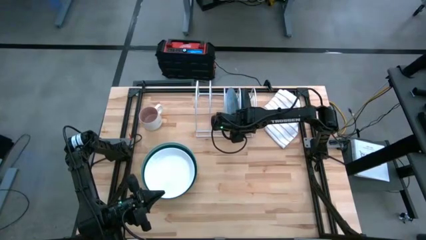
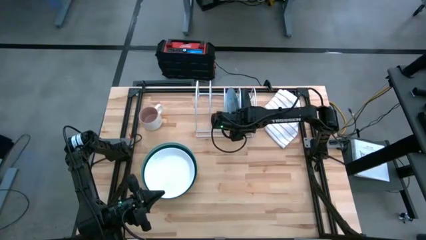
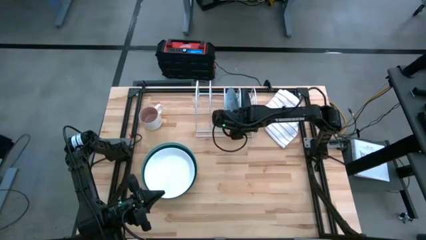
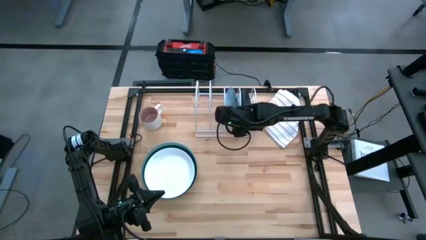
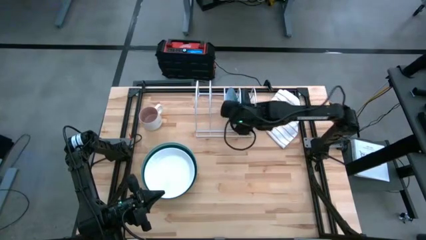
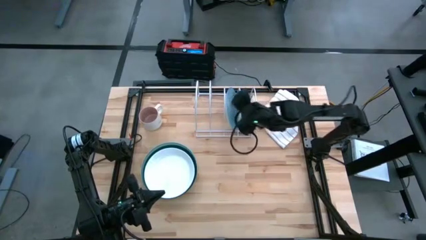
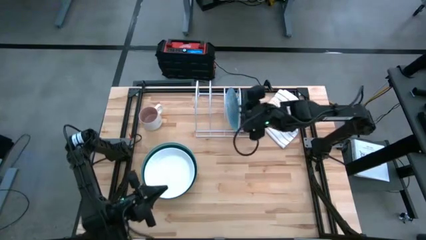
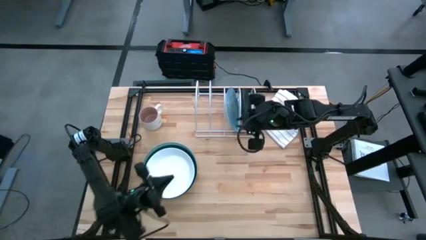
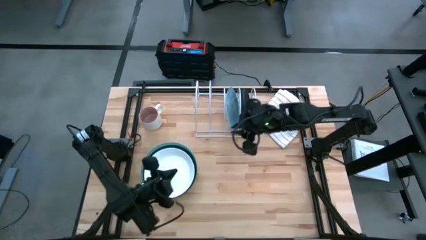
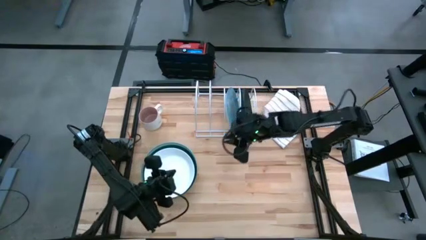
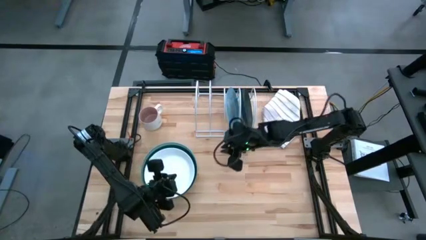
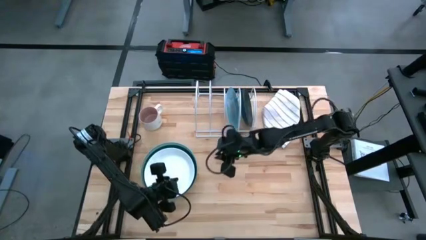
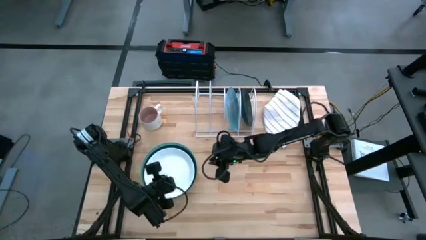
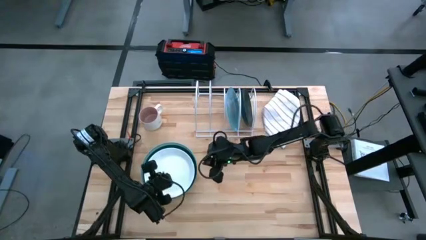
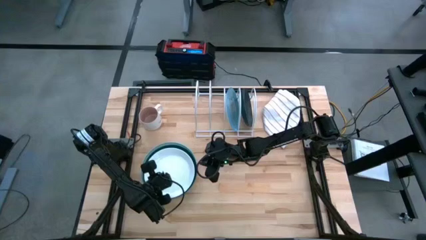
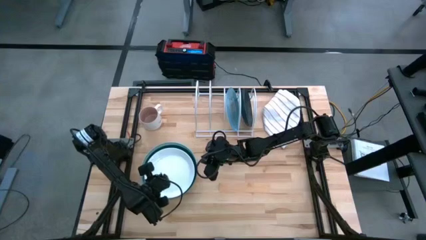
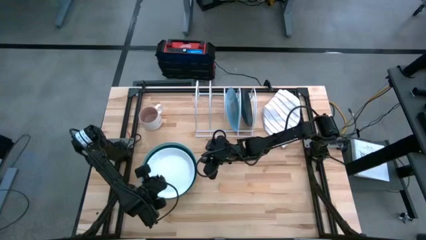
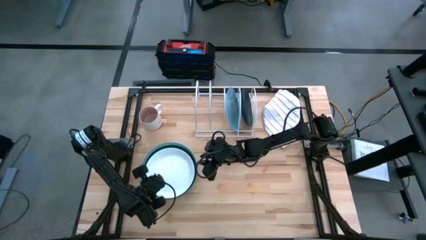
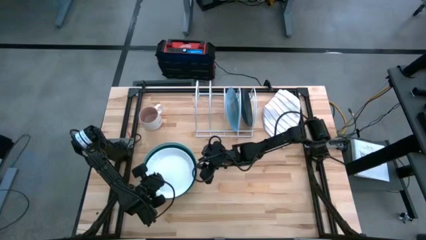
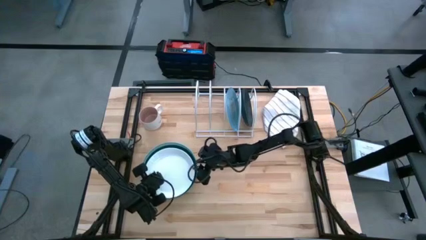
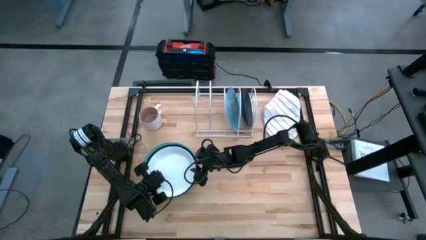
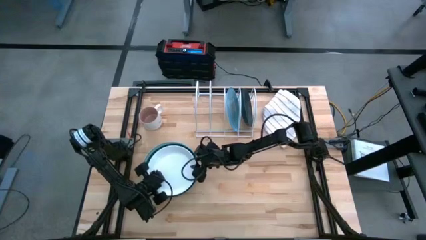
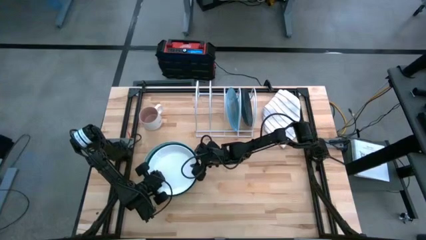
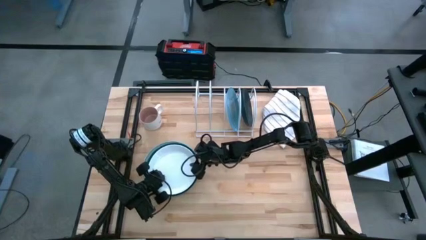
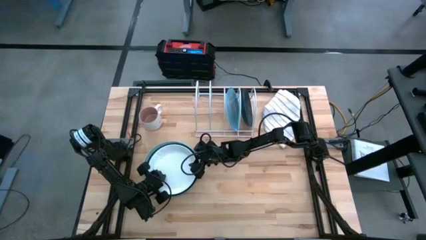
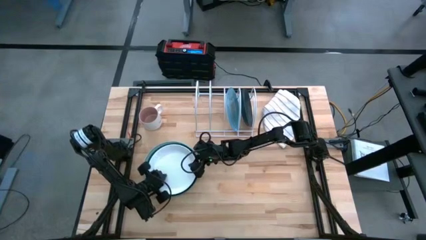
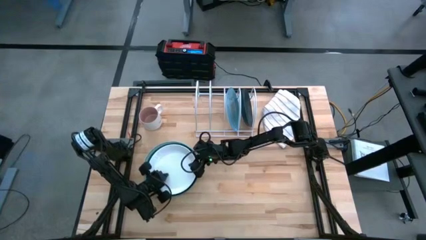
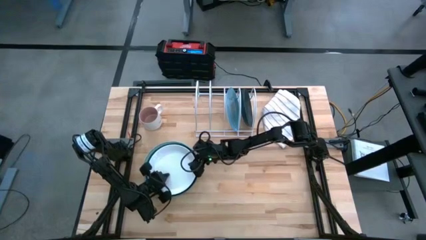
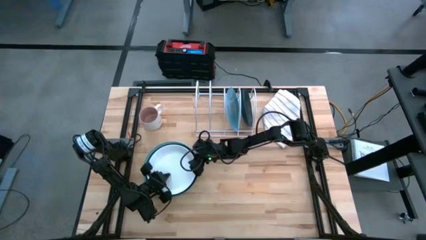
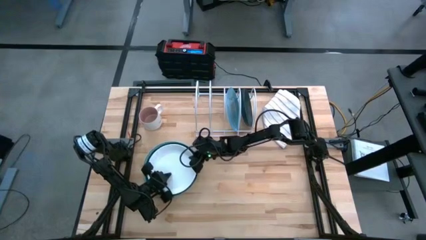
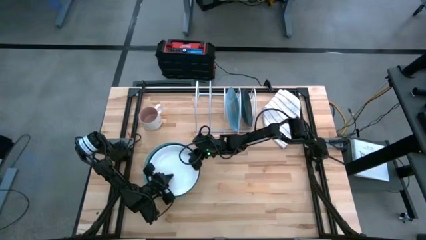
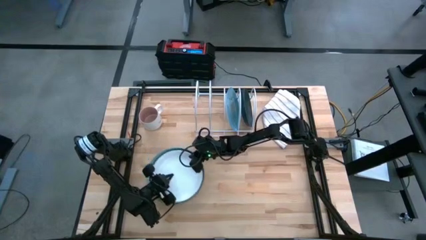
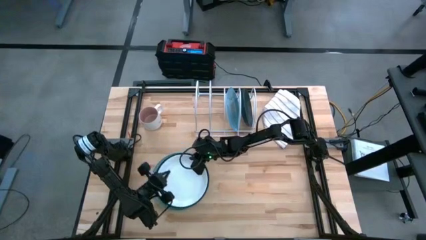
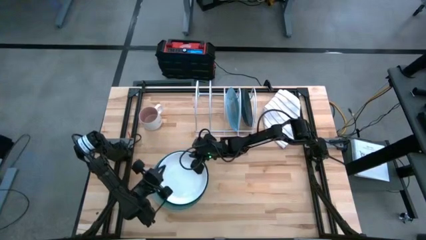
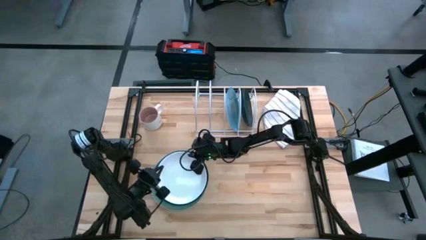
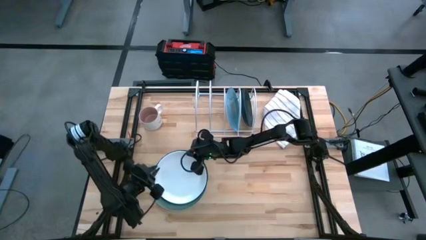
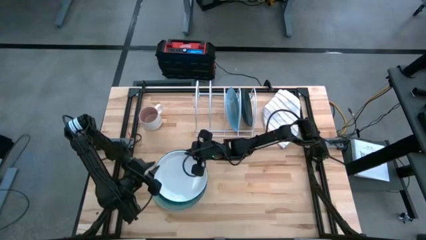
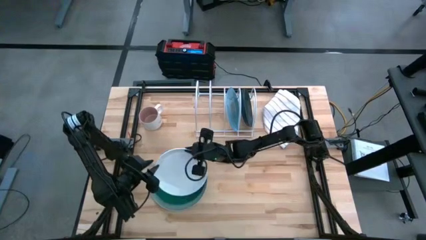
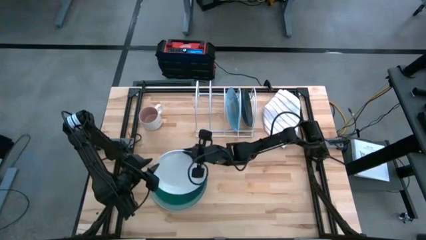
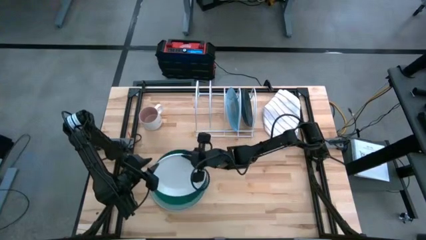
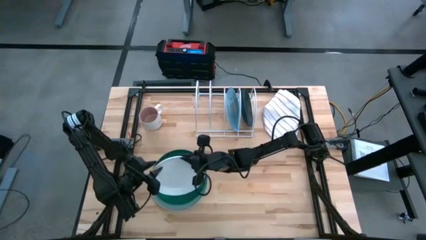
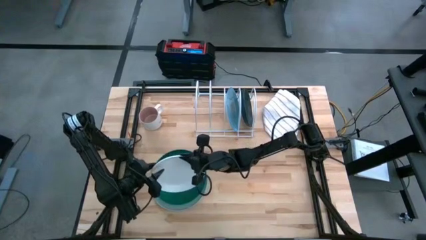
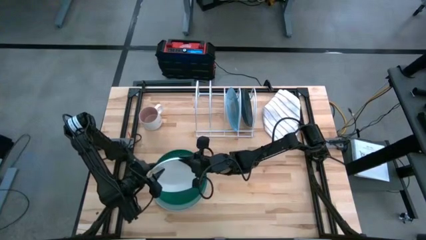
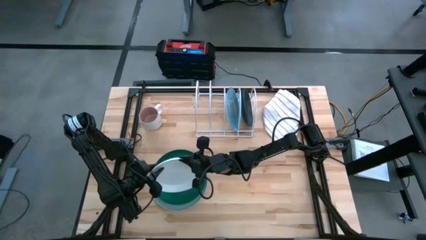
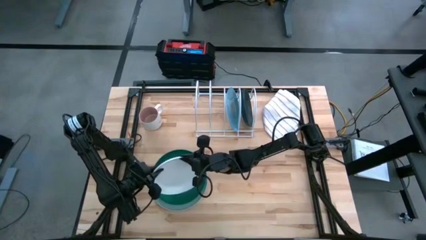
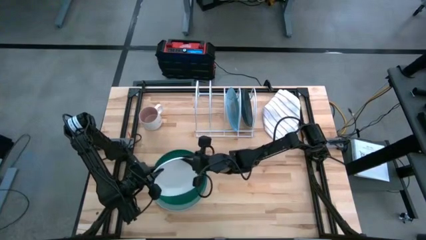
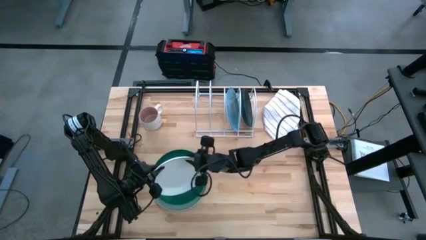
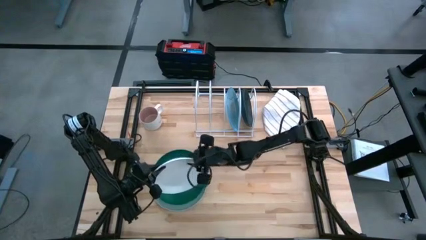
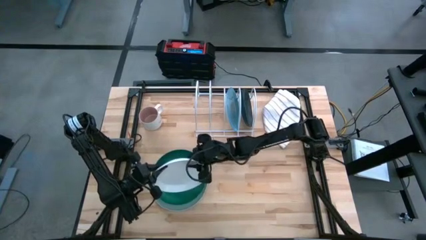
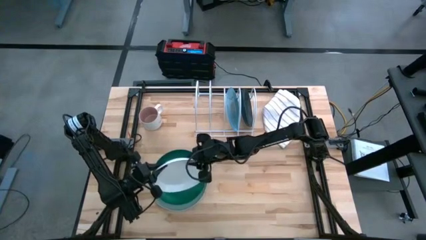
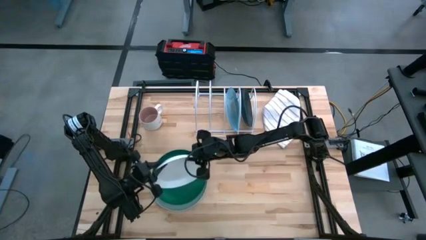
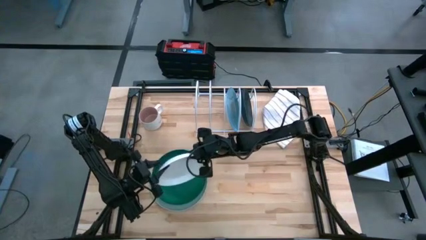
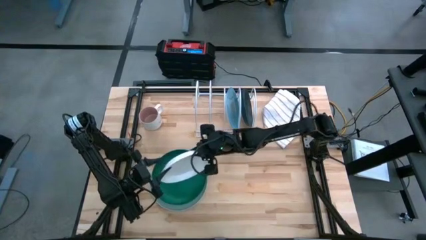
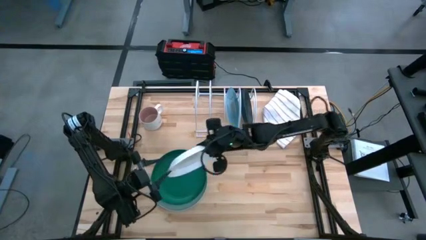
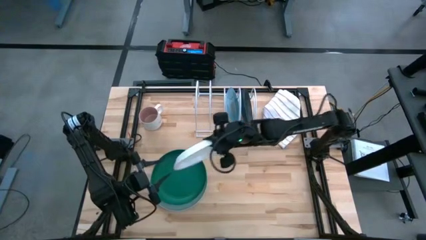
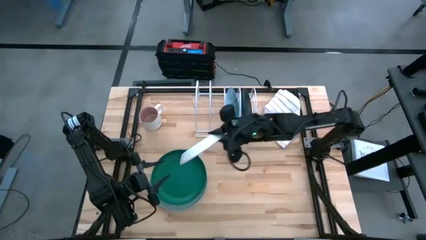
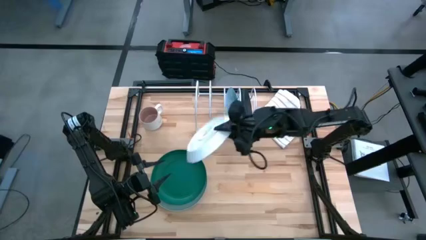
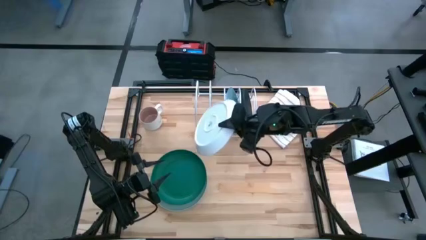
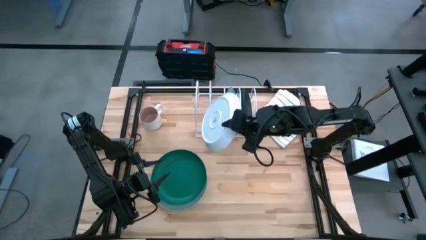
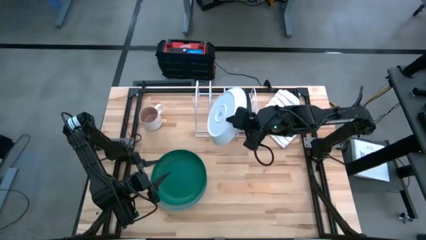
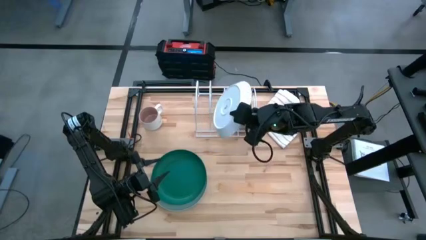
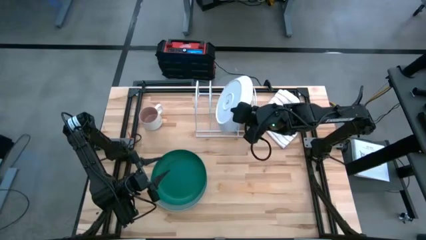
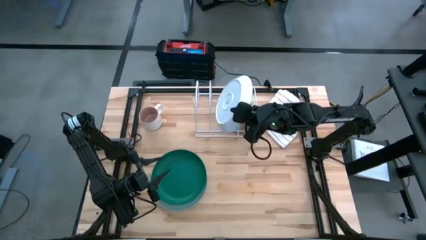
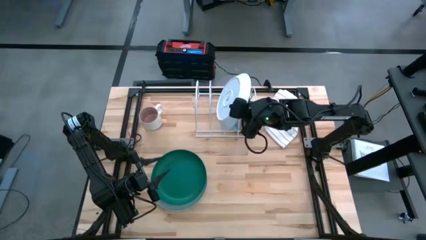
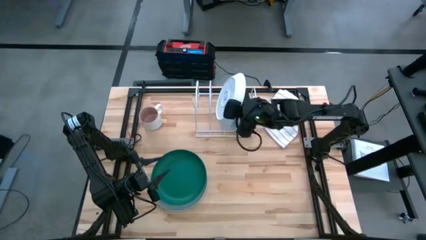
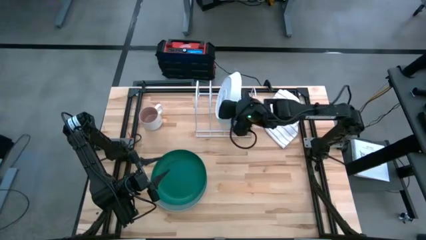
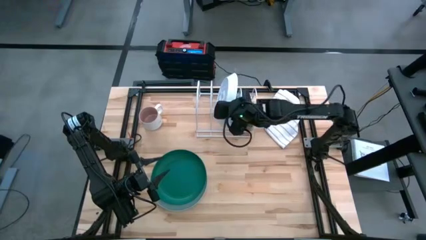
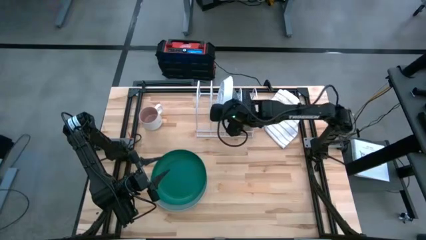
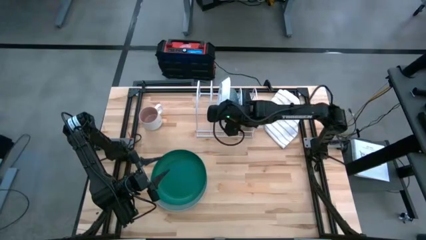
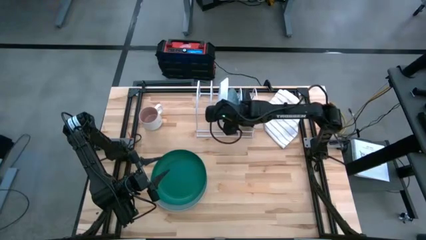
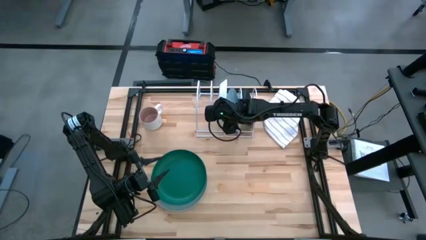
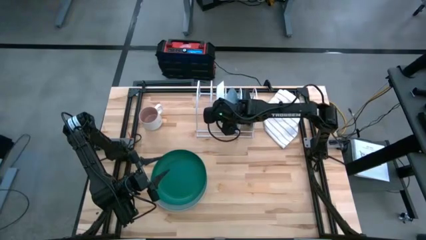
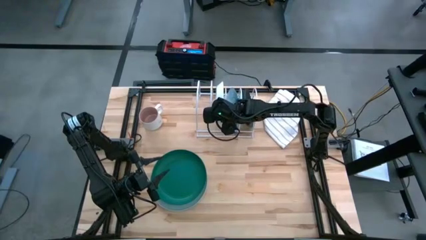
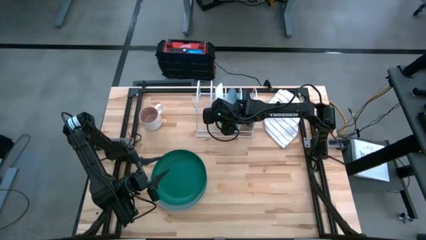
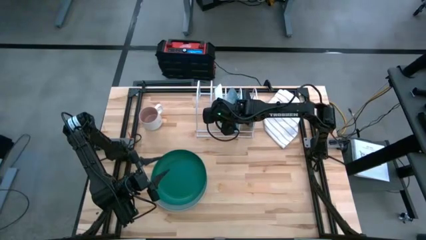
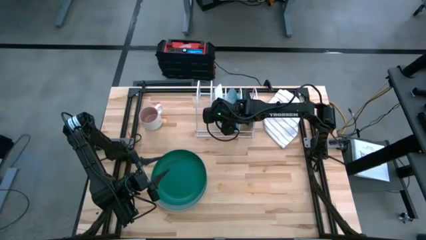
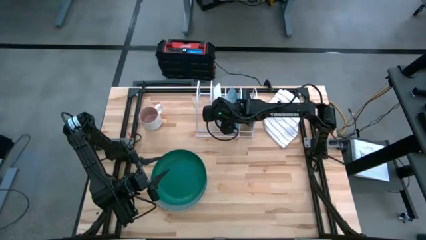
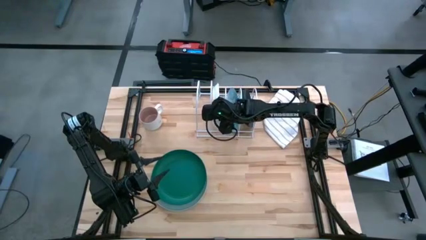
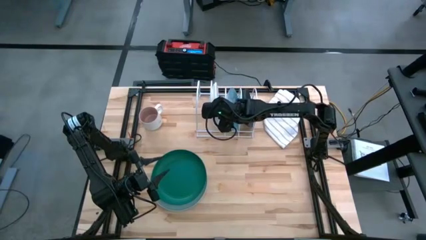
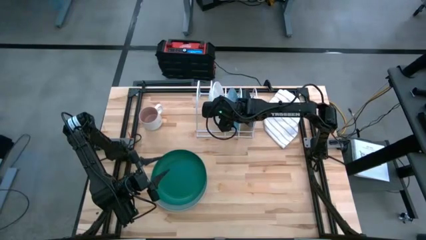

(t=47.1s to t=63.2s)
Task: Sort dishes
Put the white plate in the dishwasher rack

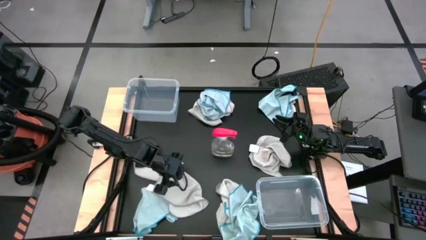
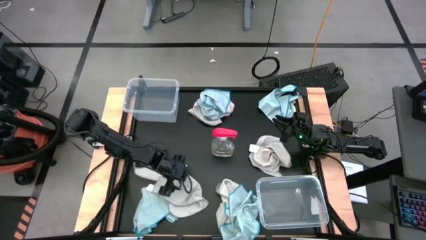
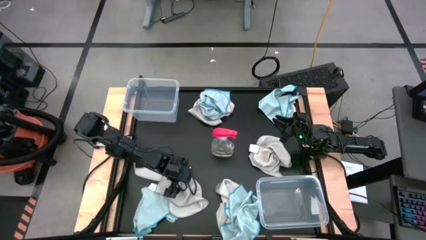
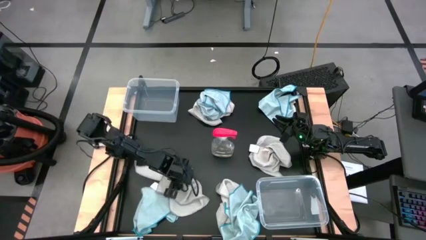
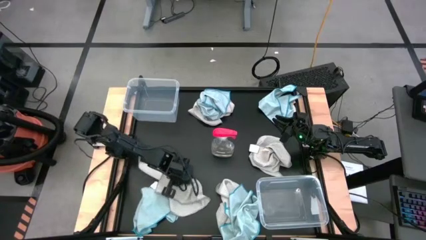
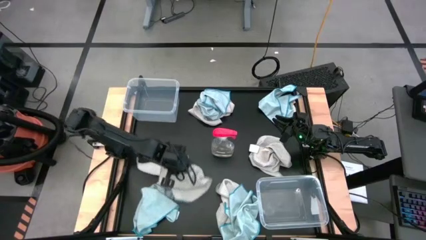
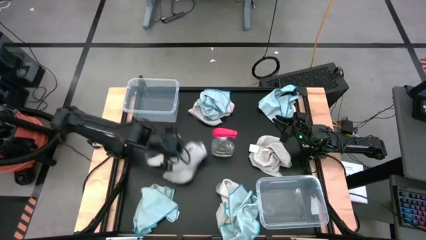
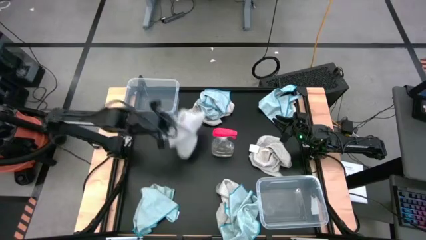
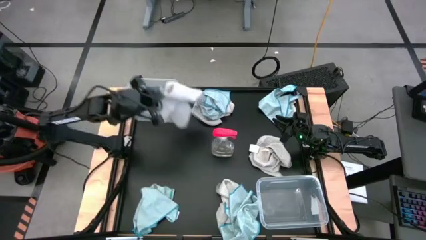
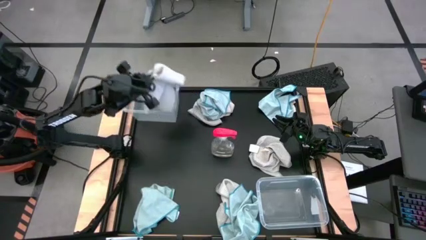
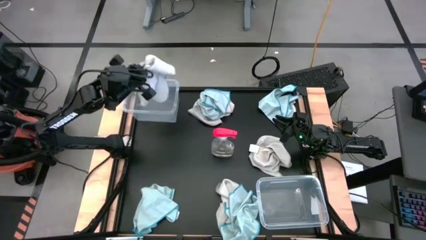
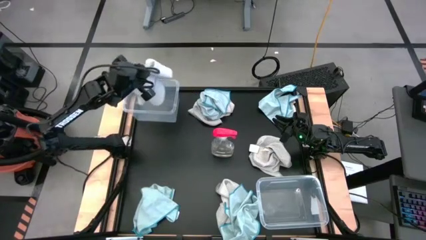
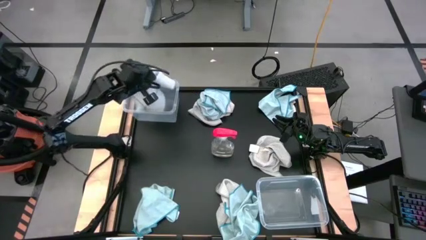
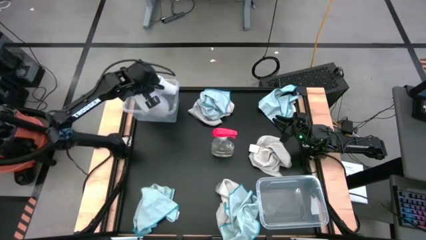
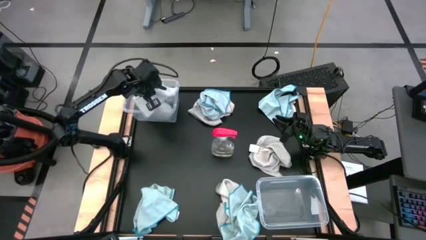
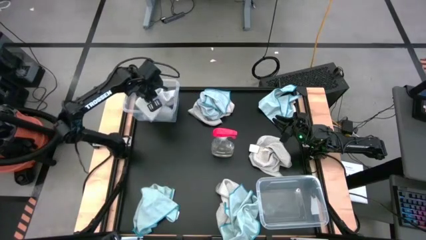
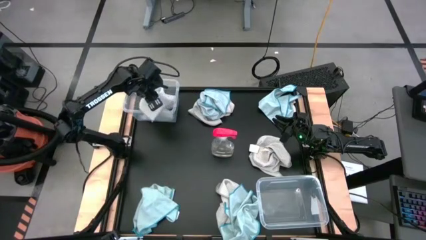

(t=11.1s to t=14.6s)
Task: Sort microfiber towel by color & place in baskets
Put the gray towel into the top transparent bin
